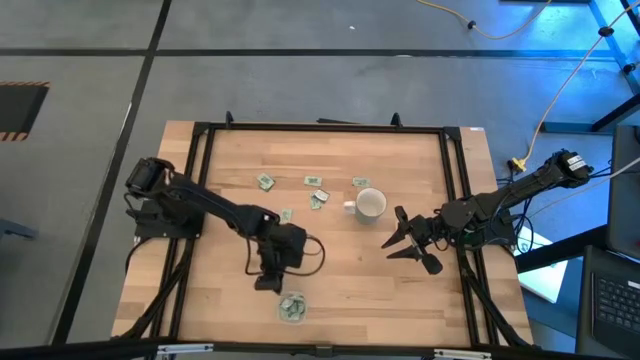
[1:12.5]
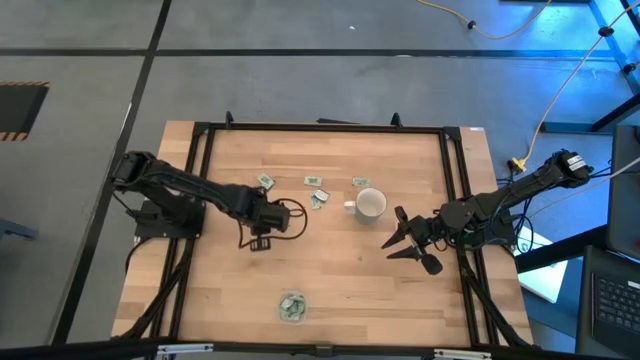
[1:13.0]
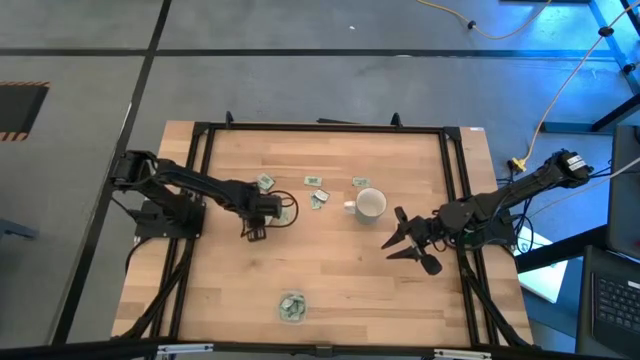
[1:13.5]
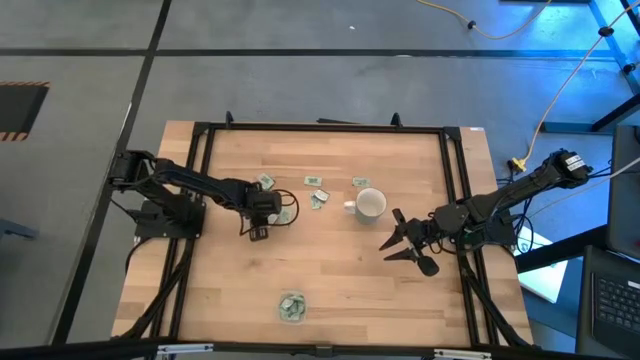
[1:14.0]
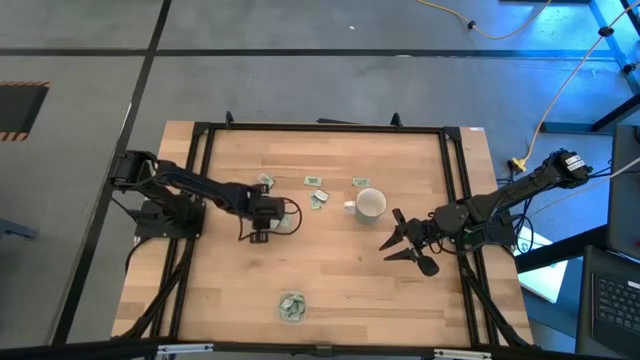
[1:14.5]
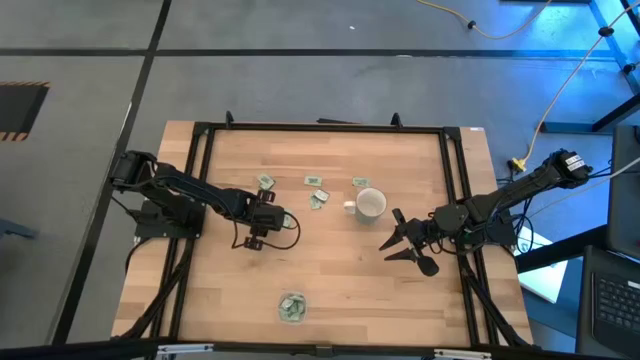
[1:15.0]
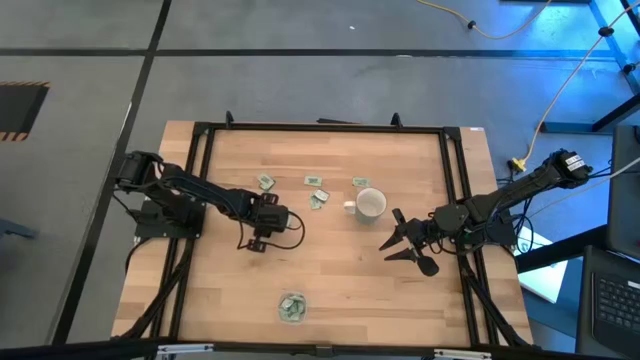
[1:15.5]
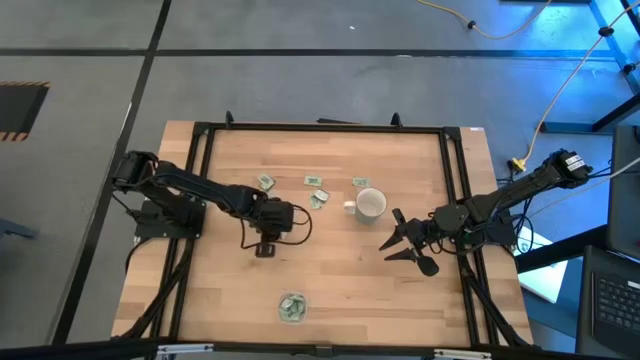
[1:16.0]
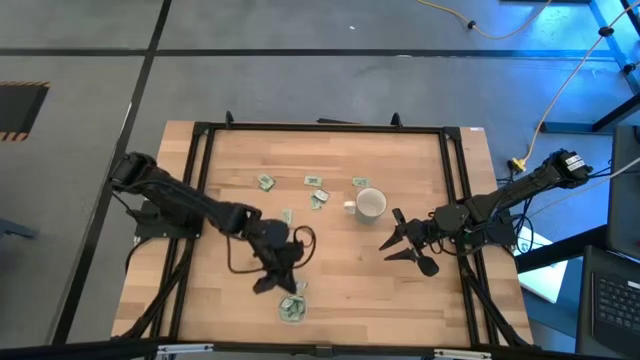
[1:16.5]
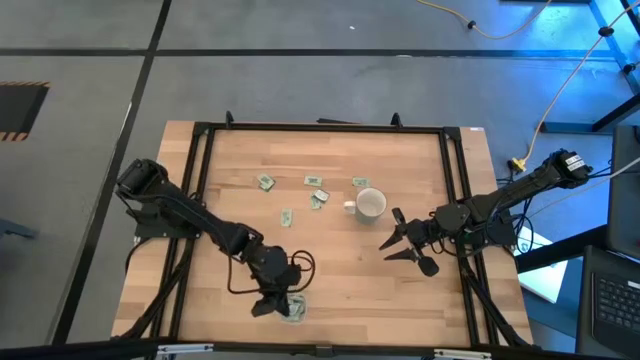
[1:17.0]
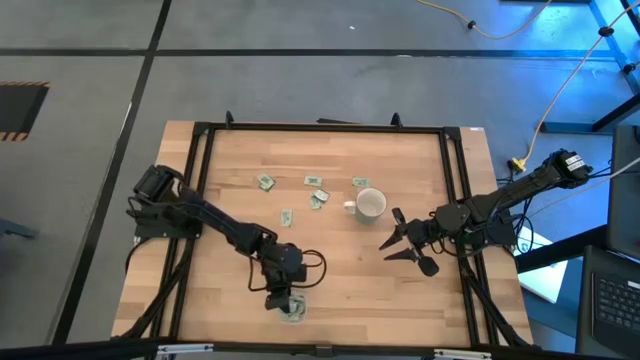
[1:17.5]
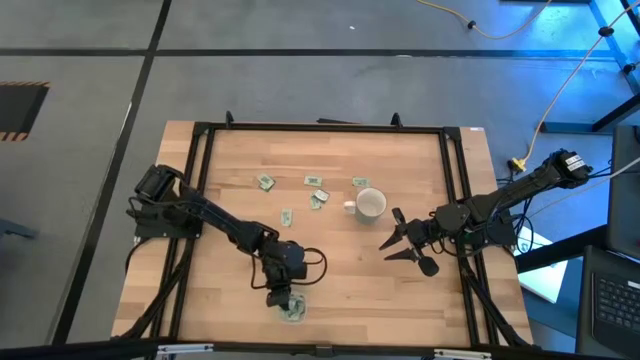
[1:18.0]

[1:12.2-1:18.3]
Task: Pick and place Stevia / Truvia into bins
Put the bottom left green stevia packet into the transparent bin

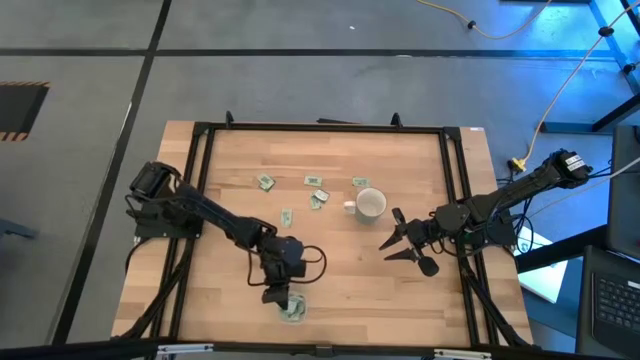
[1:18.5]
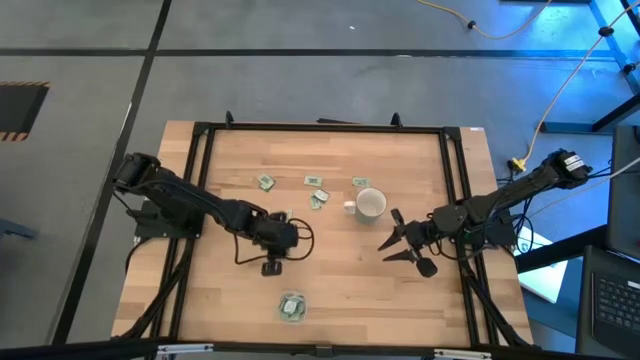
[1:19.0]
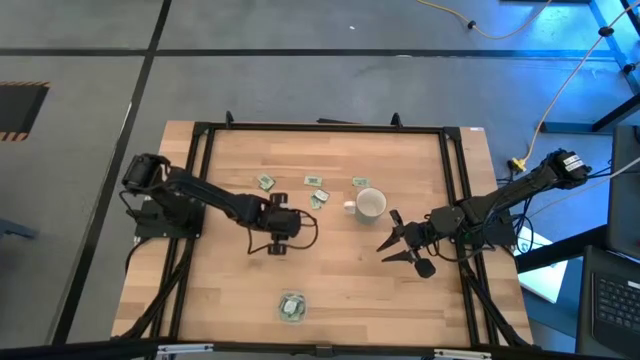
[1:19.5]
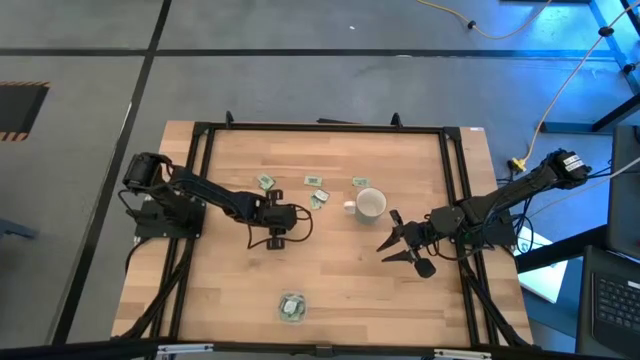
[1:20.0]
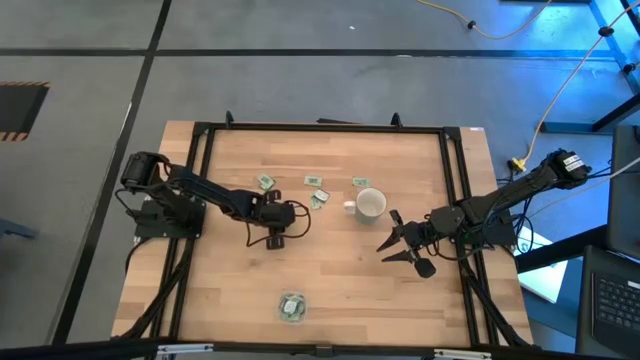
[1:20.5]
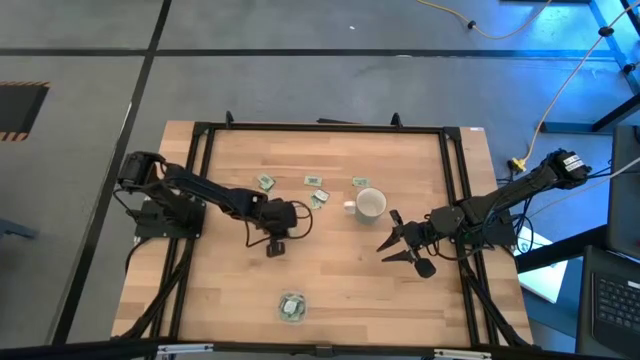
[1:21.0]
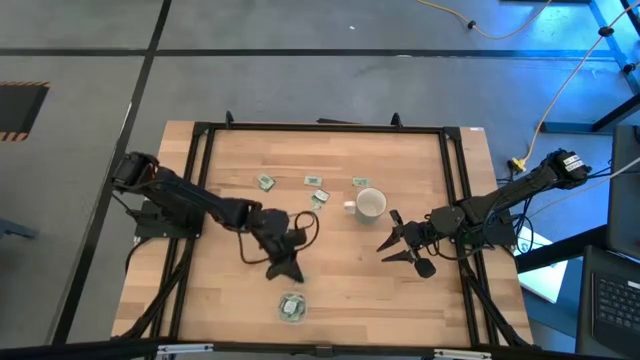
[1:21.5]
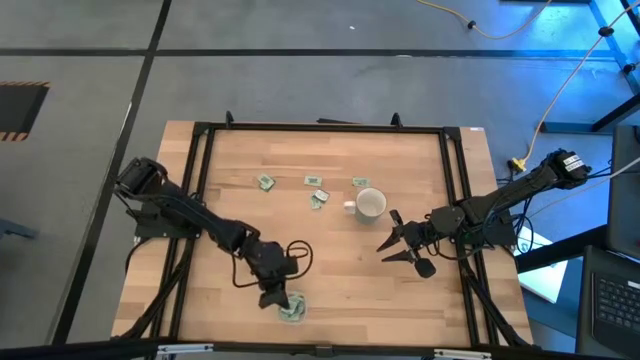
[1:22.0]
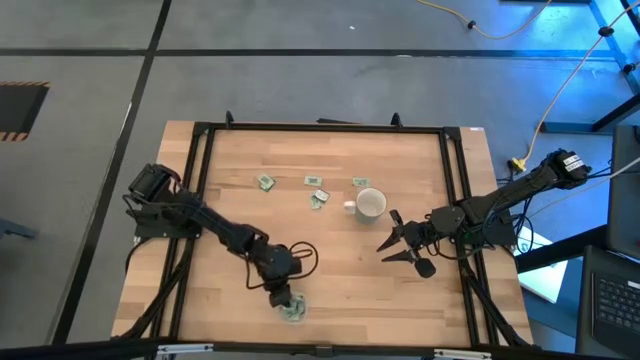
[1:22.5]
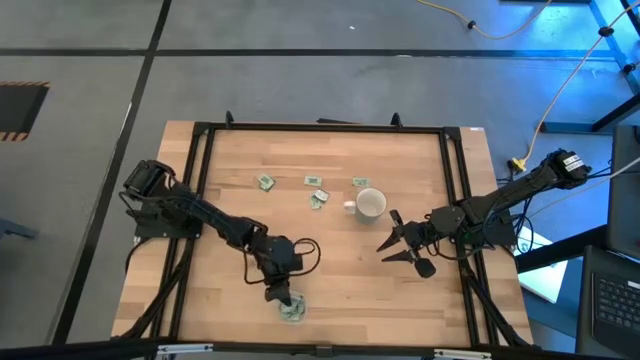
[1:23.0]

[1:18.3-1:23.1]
Put the light green stevia packet into the transparent bin

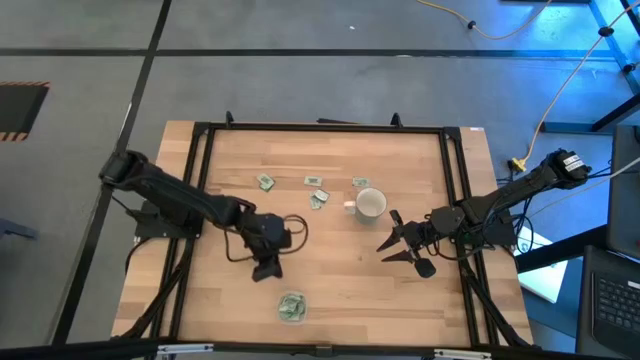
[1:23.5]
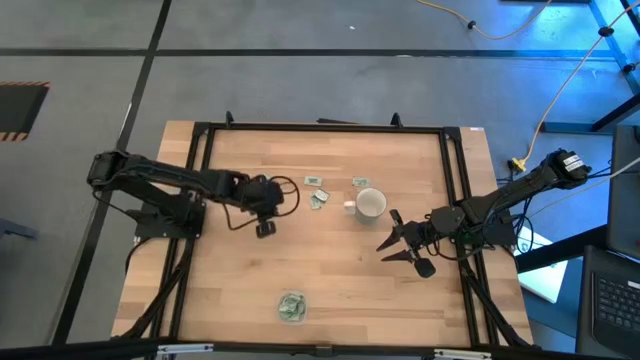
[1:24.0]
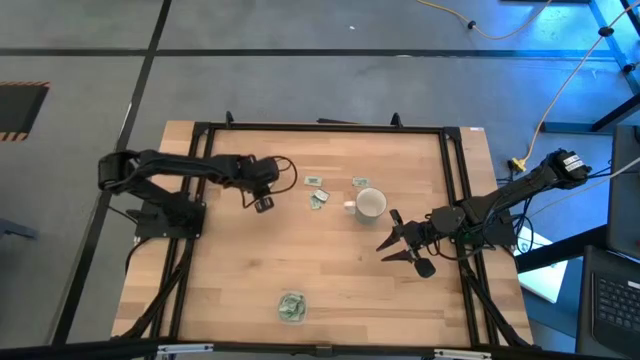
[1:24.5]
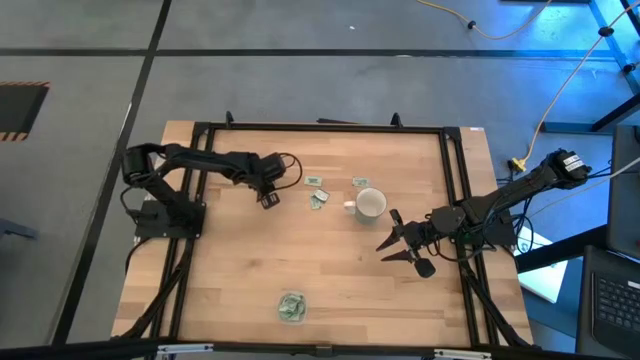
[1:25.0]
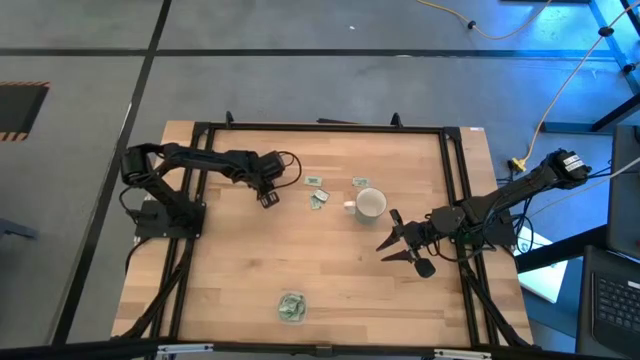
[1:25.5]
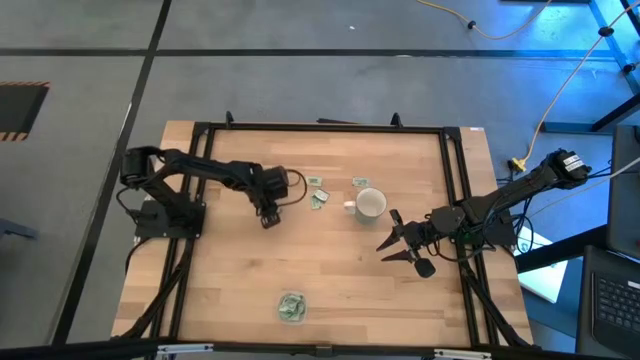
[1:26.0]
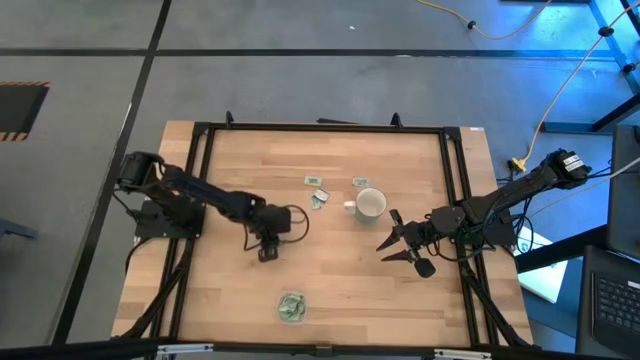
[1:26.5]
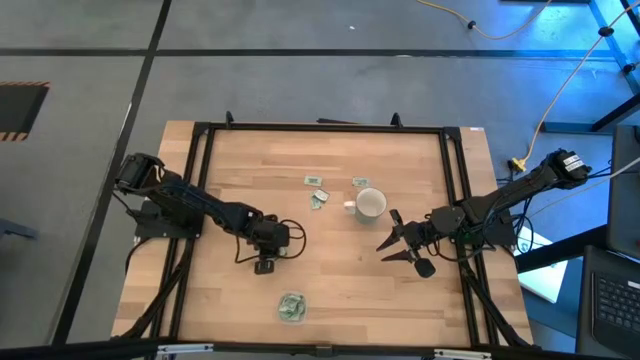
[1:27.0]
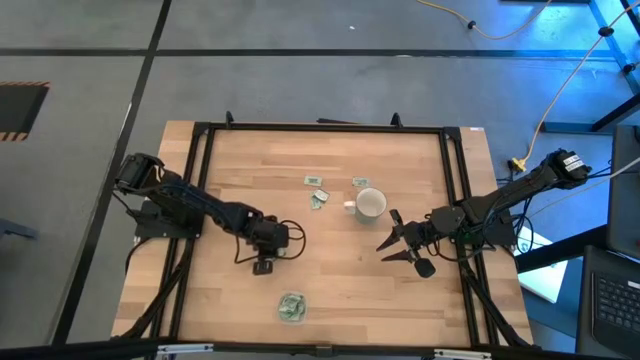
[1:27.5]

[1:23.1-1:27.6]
Put the light green stevia packet into the transparent bin

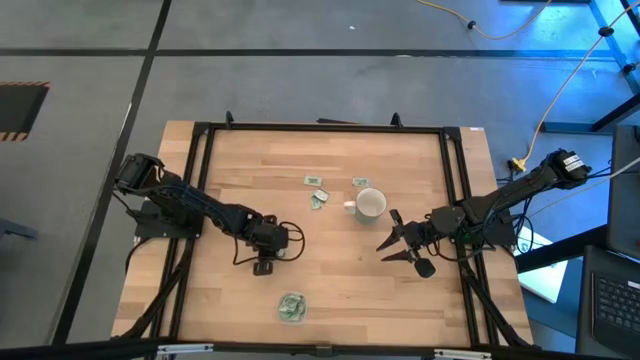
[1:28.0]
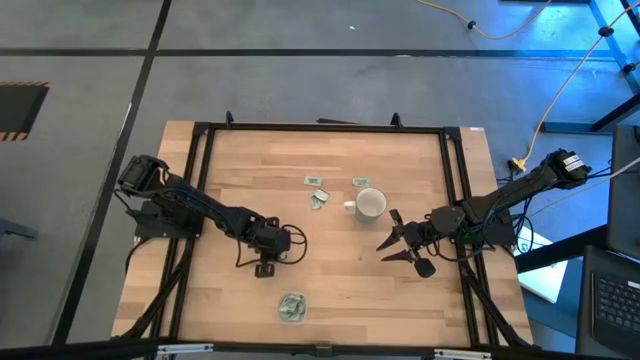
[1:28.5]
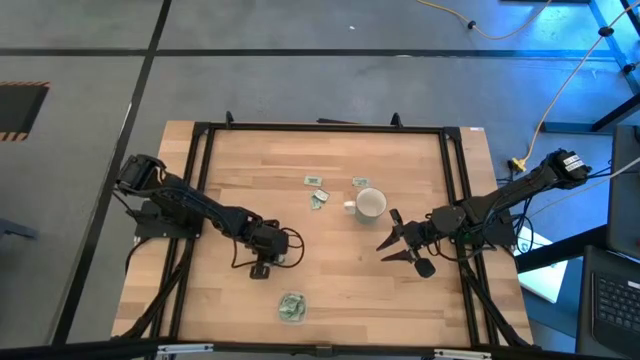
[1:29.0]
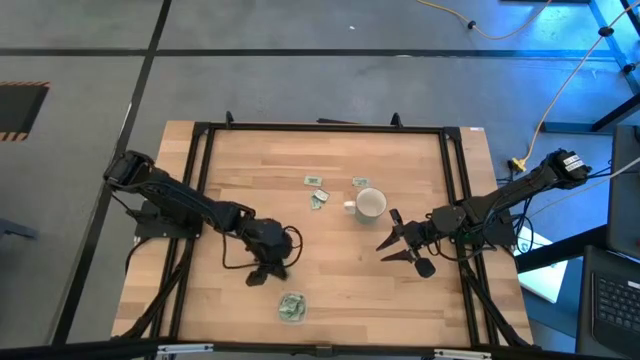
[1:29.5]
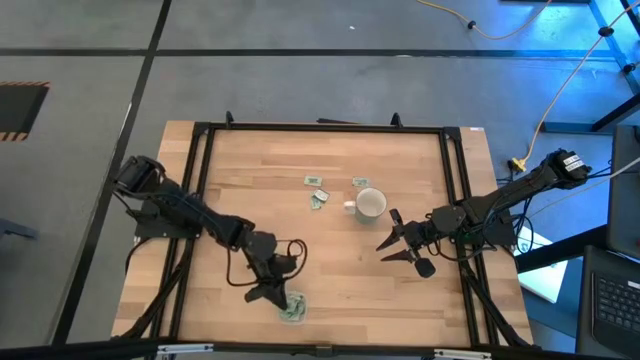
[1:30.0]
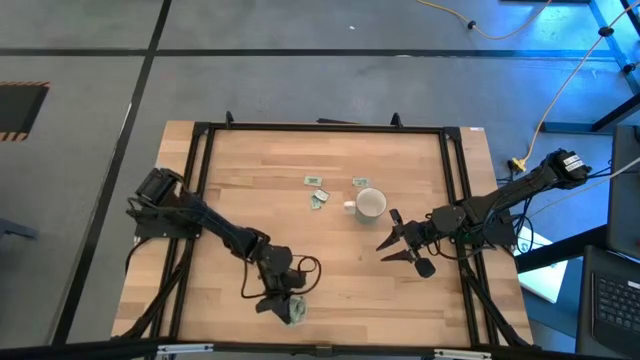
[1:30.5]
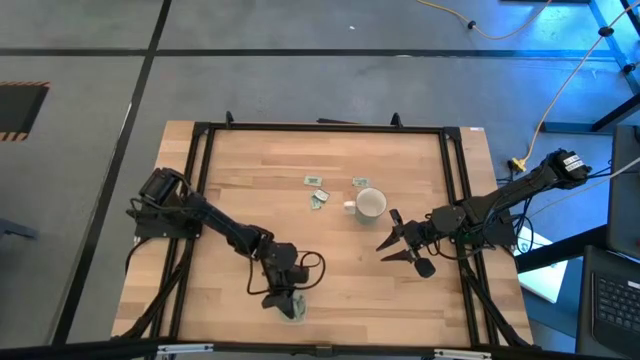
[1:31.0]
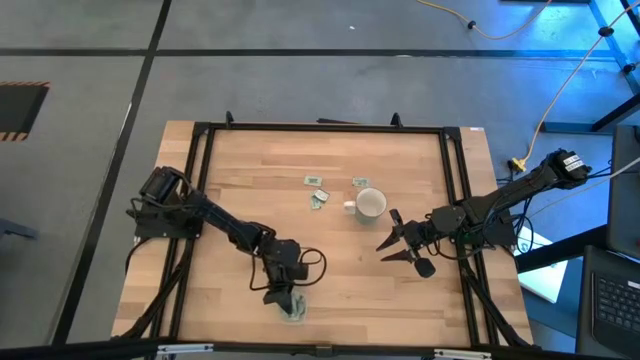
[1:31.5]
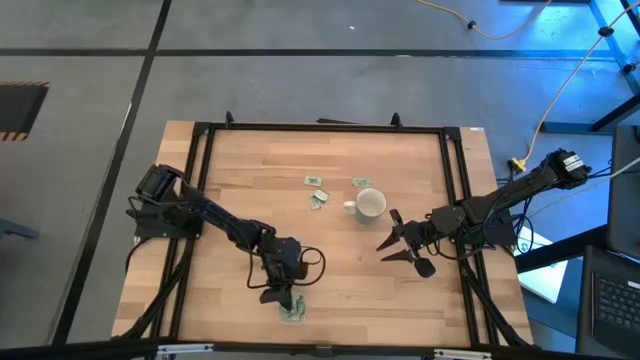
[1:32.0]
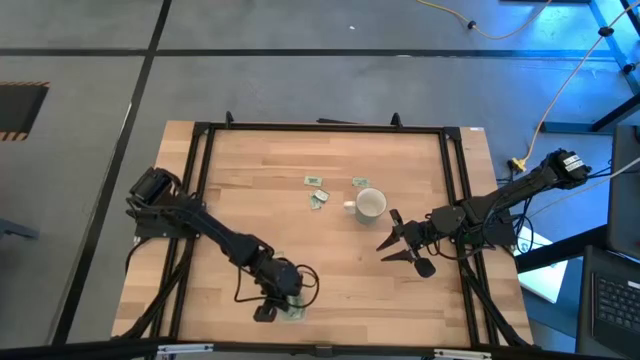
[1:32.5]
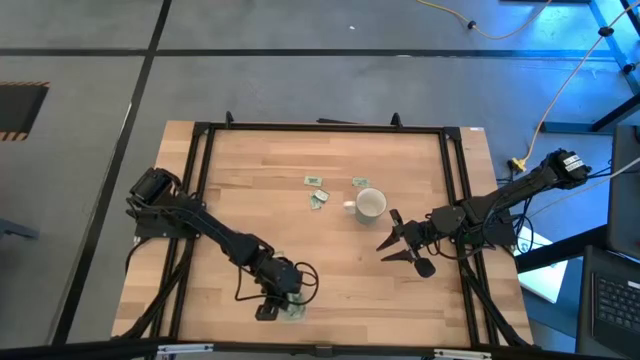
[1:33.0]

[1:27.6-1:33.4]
Put the light green stevia packet into the transparent bin
